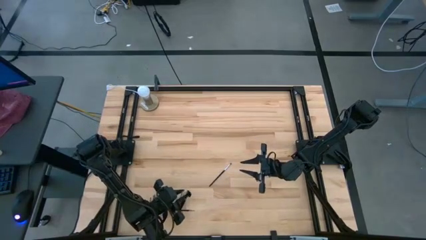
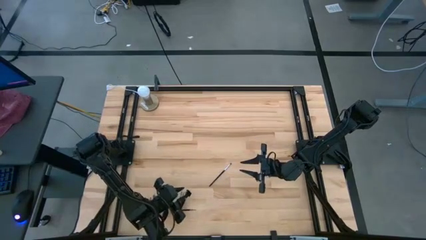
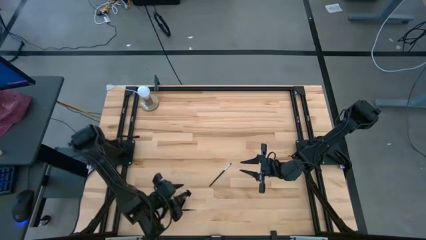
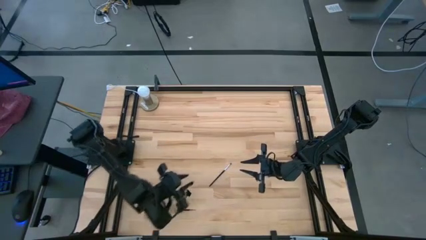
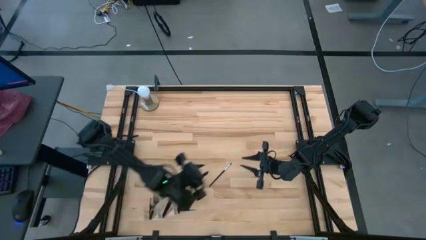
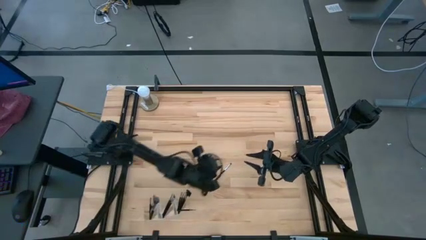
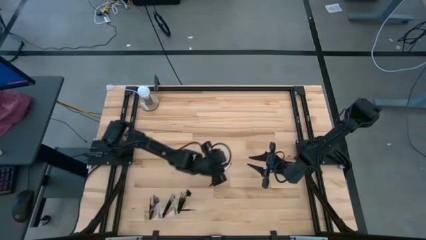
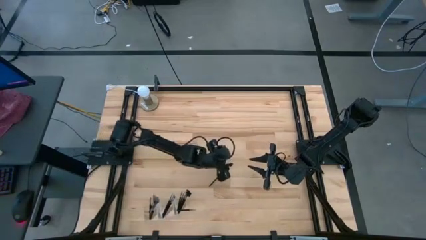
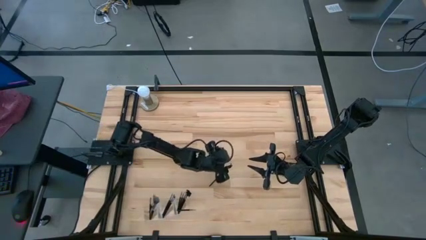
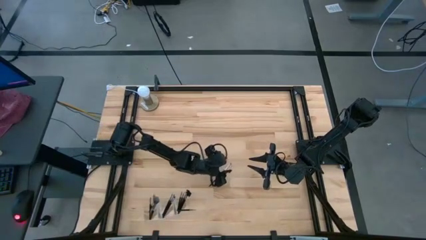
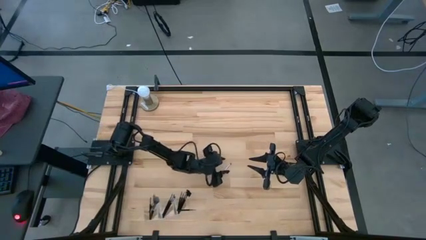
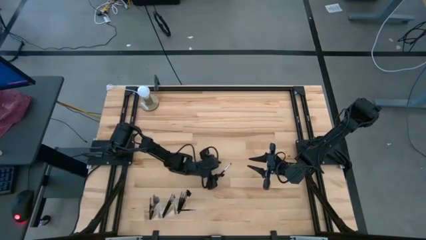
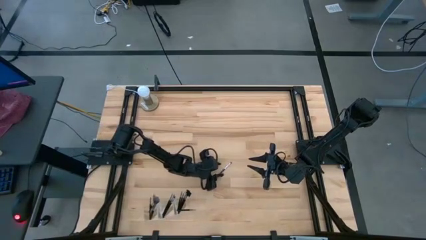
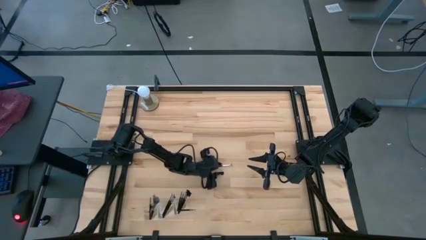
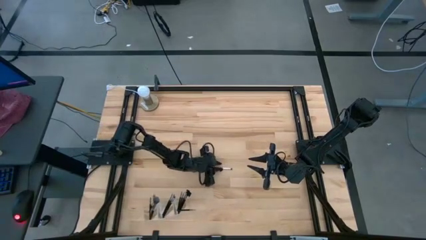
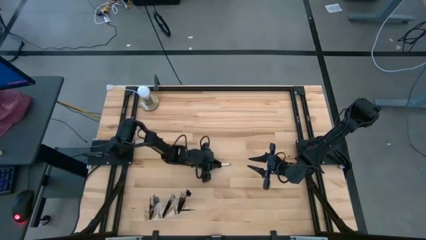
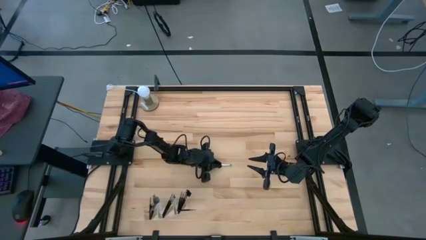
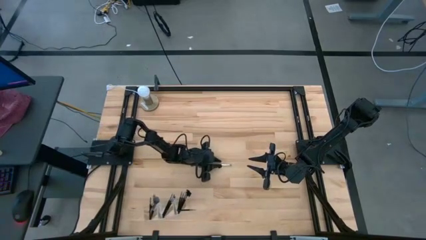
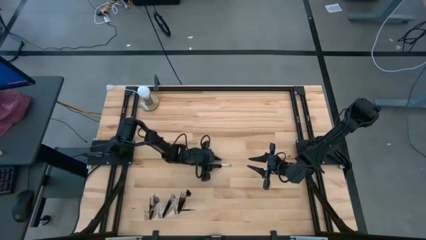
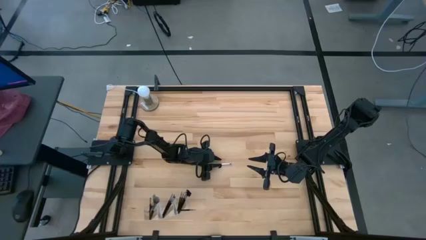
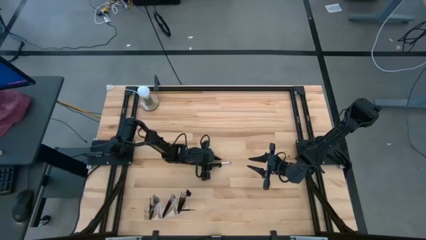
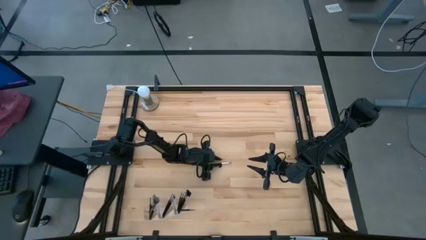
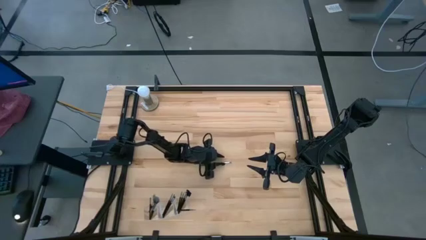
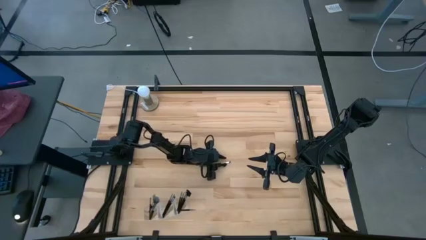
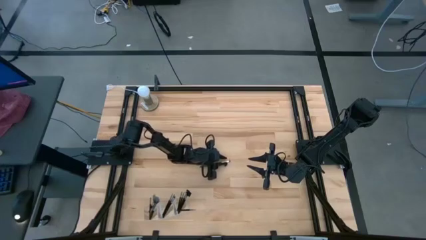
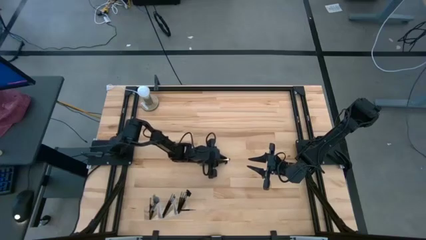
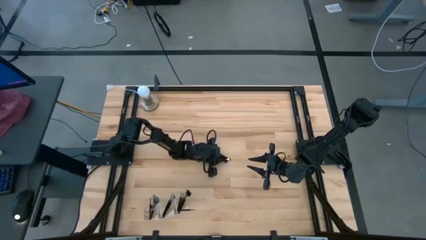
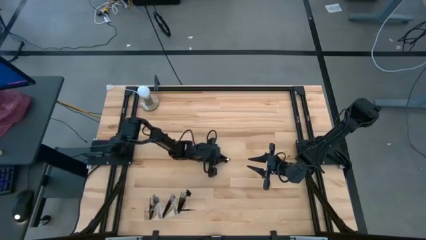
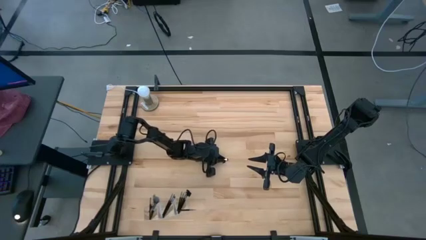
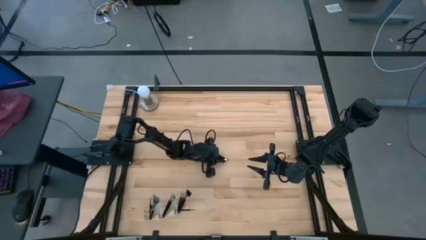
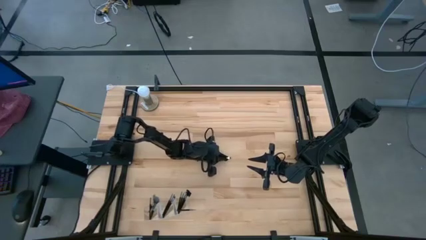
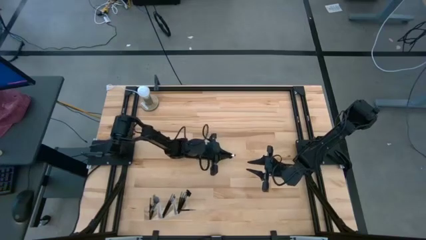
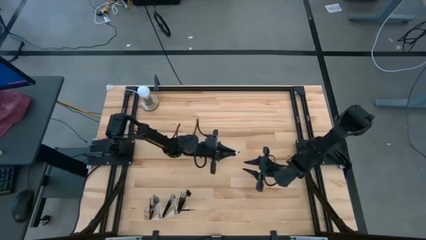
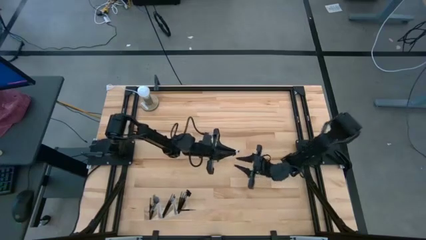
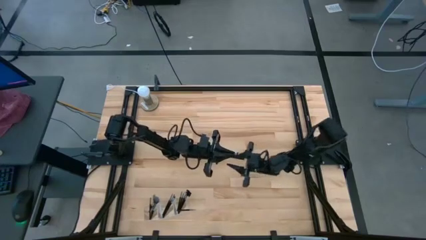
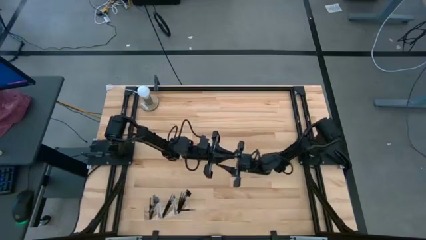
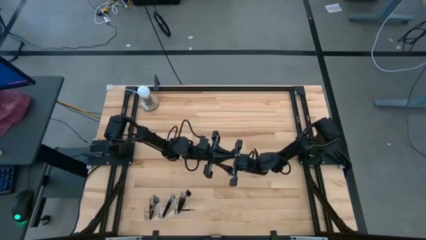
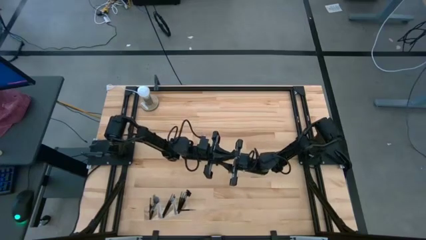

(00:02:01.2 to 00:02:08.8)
Task: Put items in baskets/containers
Put the black eyeshadow brush into the transparent organizer

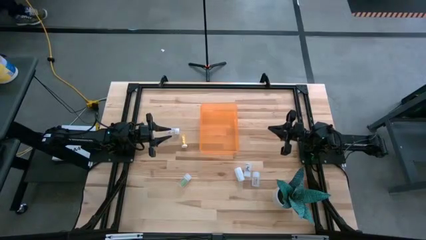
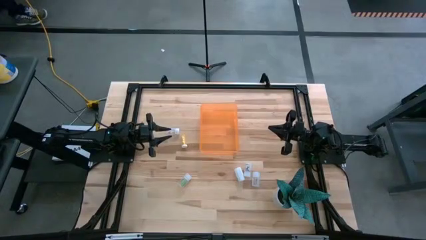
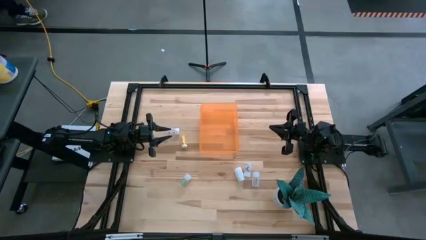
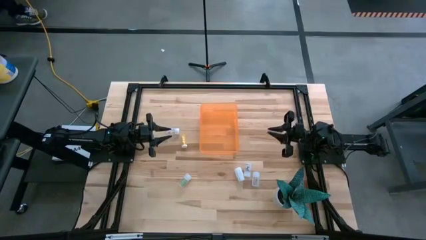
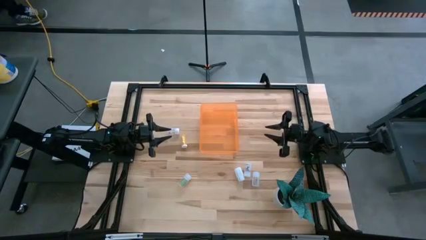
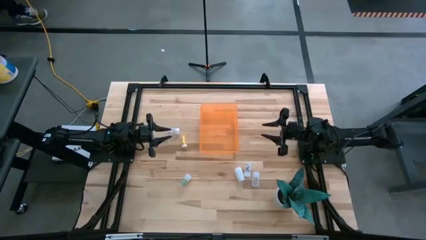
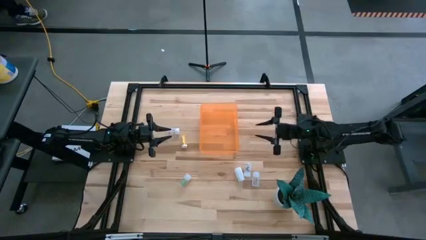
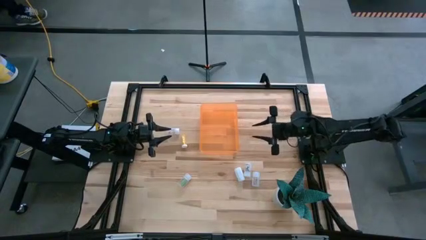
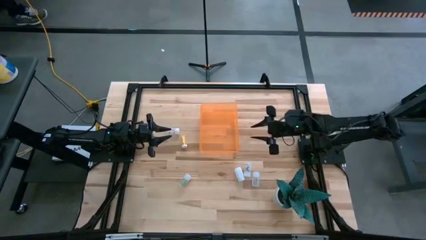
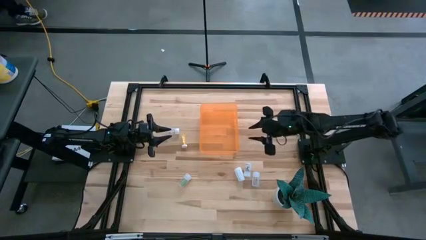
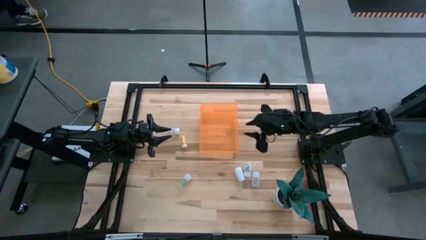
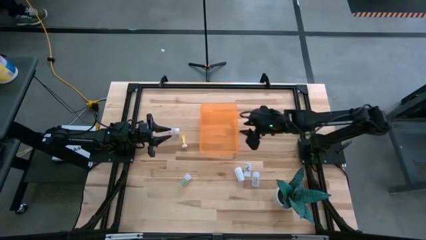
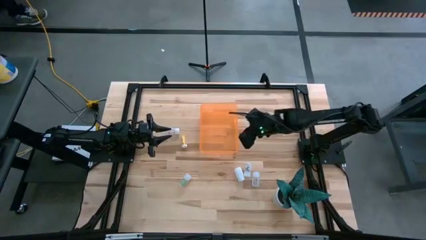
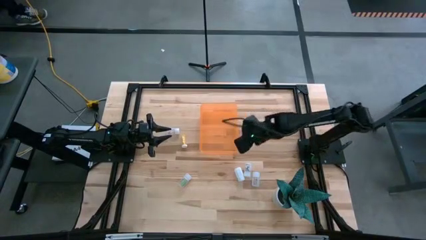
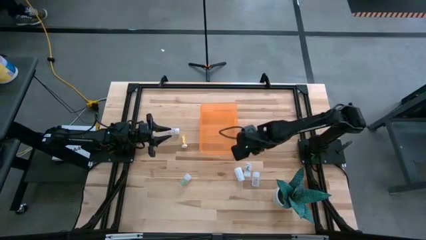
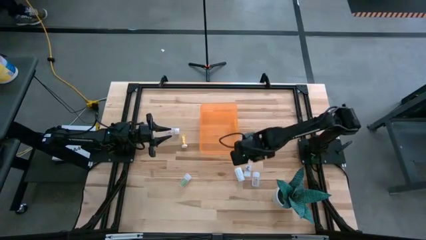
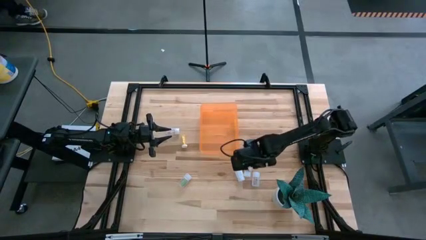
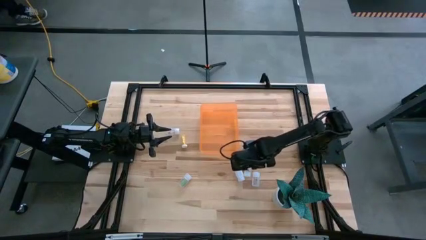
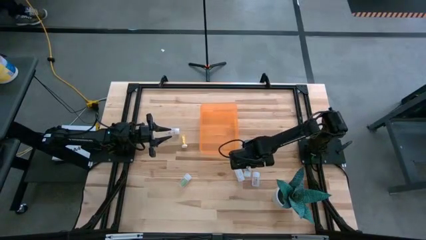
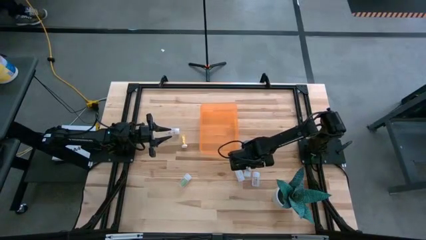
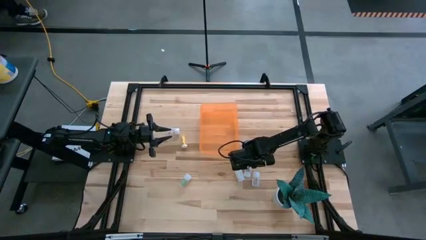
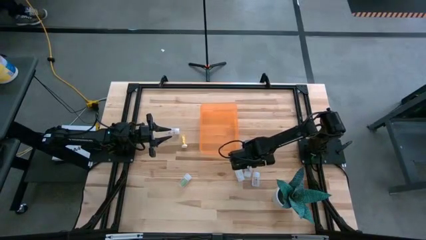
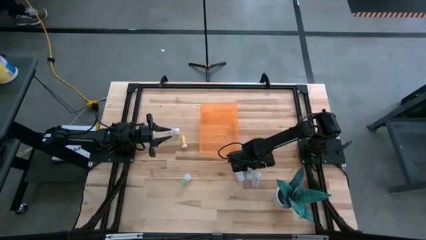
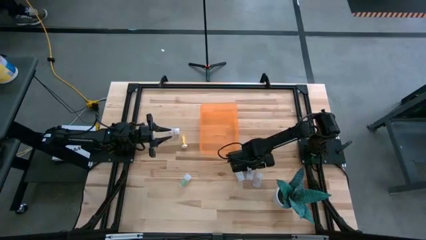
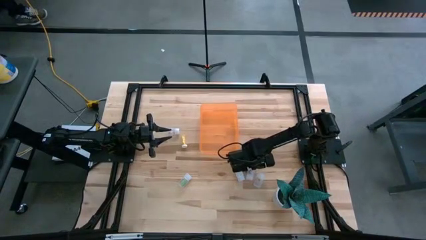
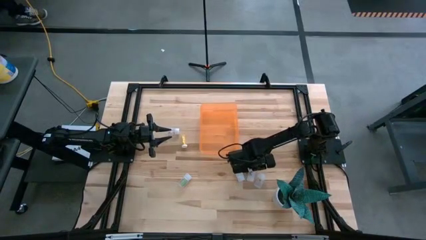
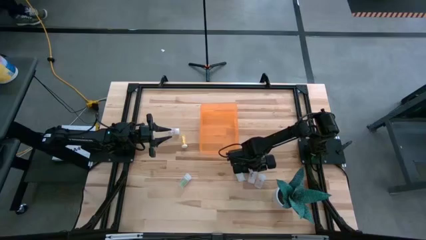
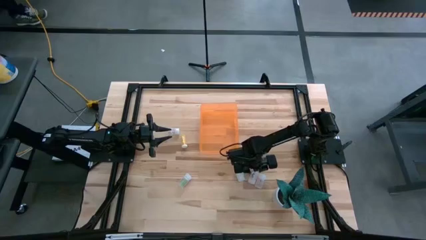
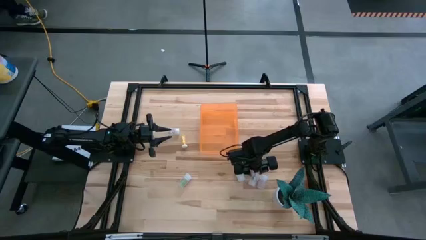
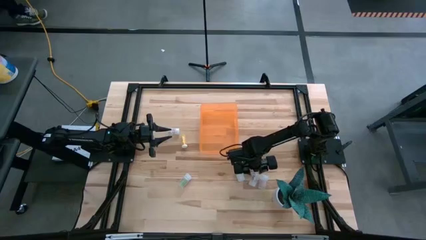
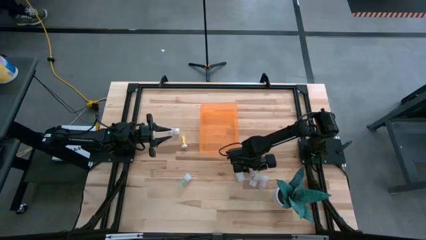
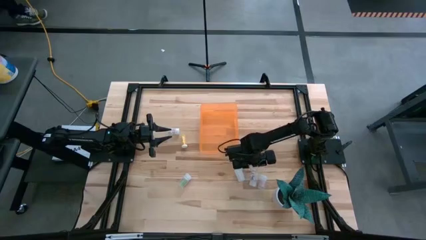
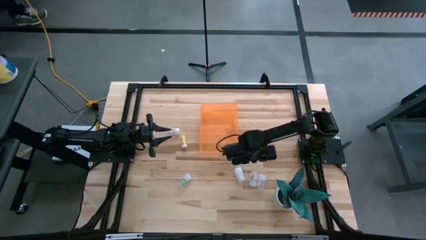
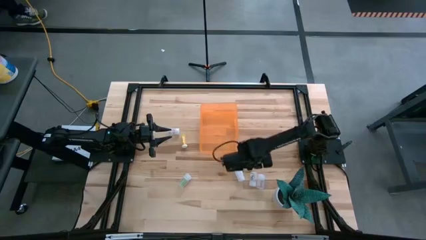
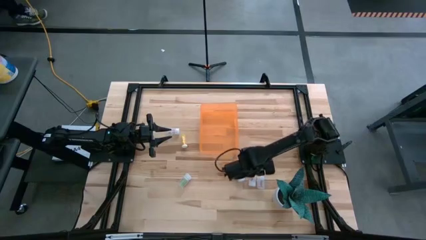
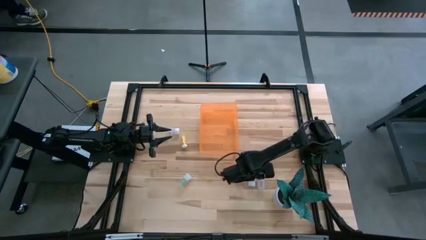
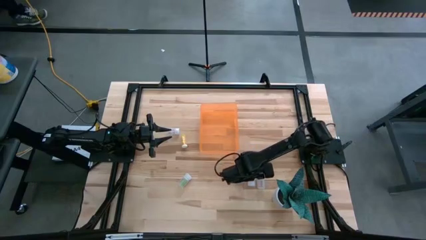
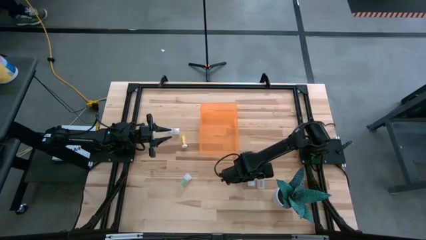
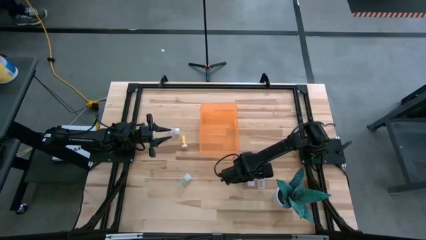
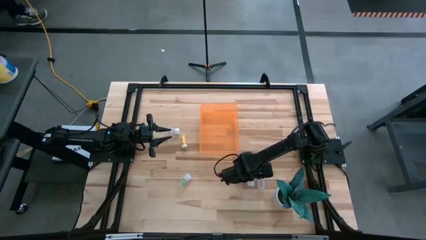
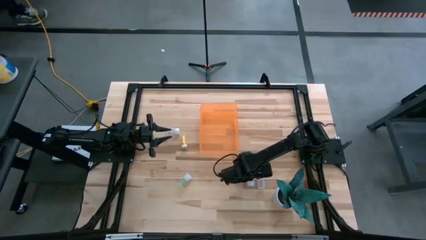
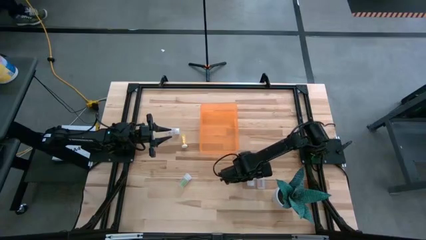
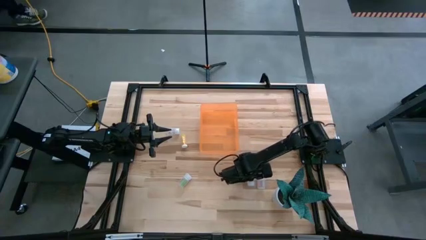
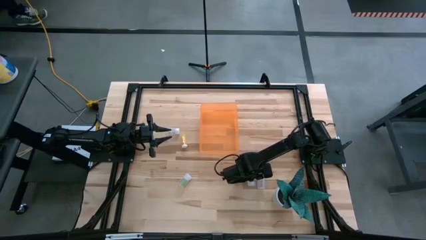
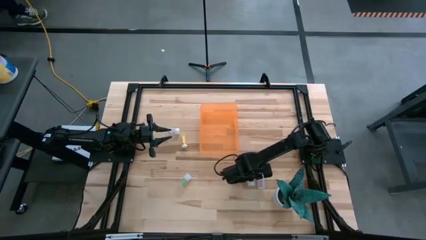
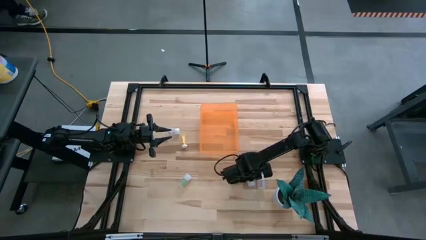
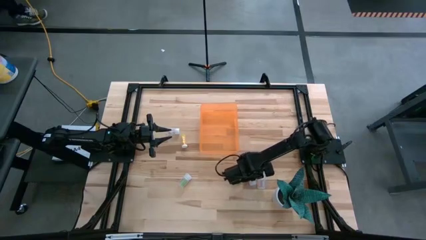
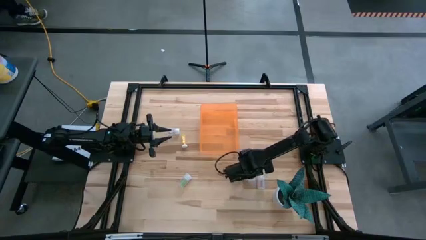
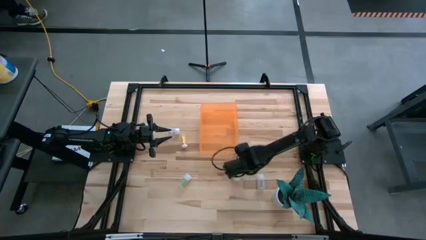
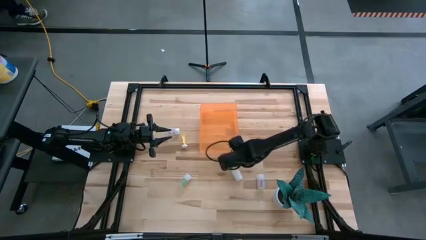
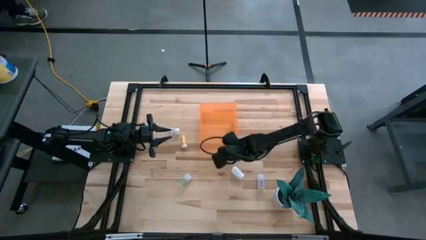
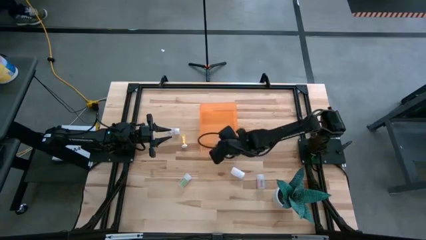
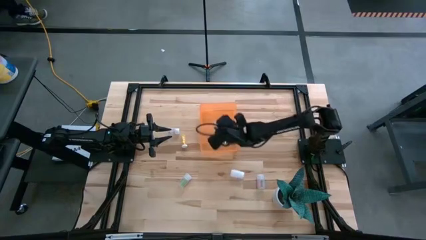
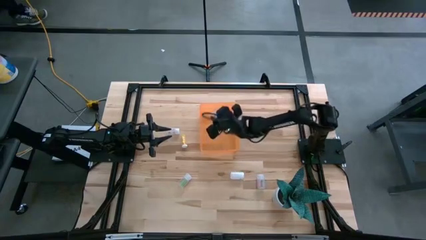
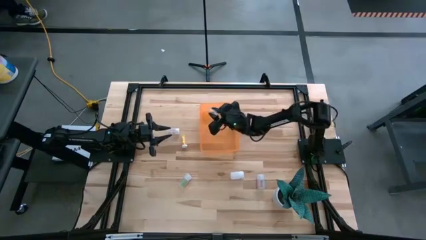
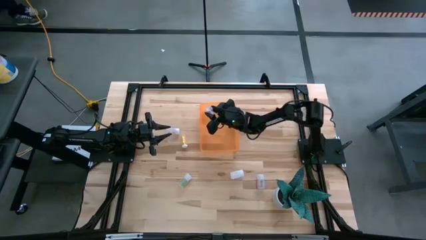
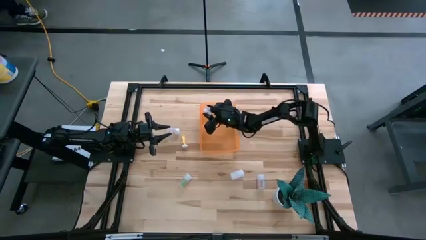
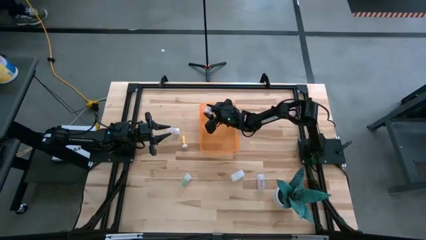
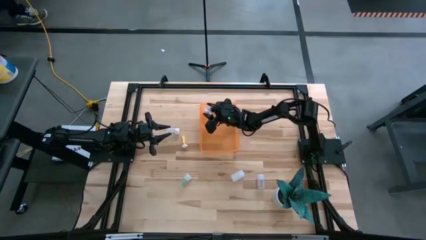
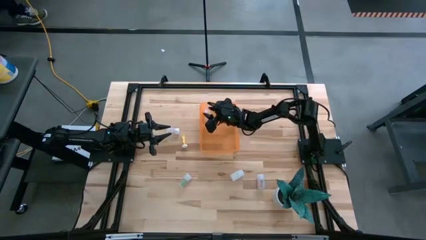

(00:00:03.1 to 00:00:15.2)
Task: Pick and place pill bottles into a basket
Put the transparent pill bottle into the orange bin
